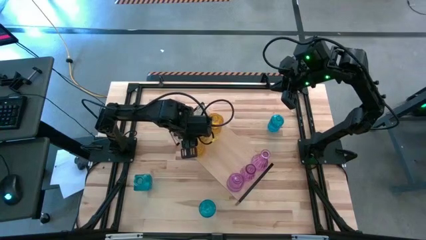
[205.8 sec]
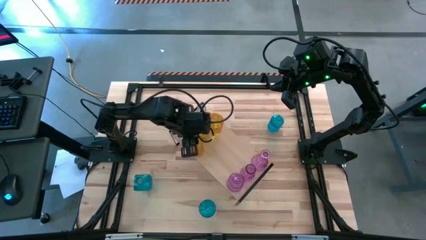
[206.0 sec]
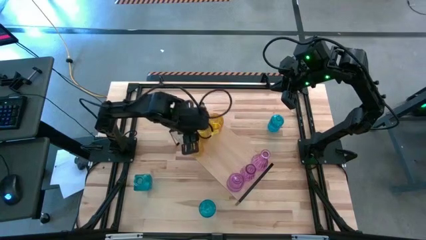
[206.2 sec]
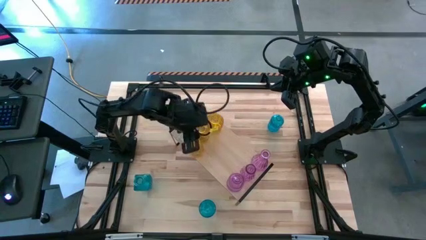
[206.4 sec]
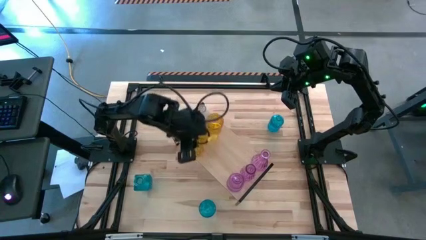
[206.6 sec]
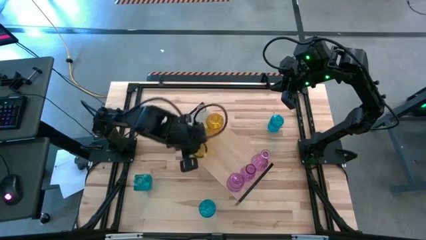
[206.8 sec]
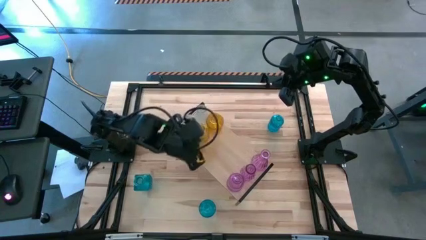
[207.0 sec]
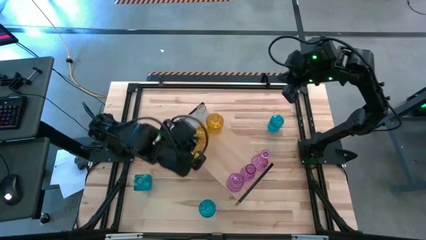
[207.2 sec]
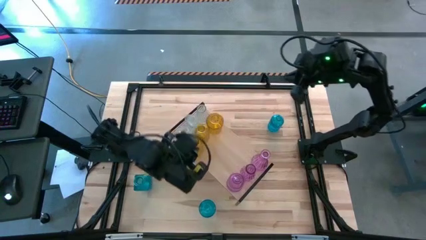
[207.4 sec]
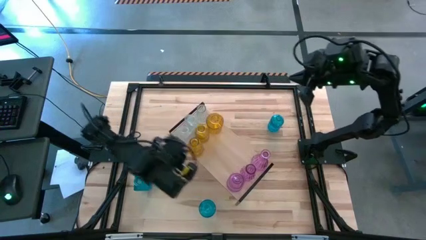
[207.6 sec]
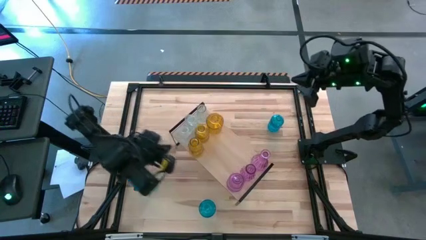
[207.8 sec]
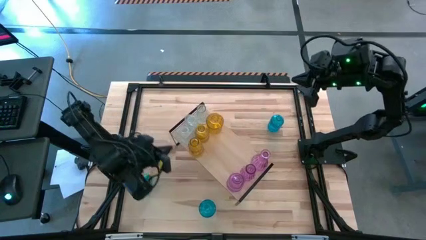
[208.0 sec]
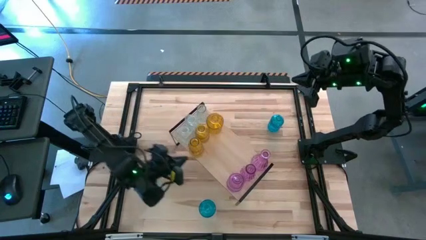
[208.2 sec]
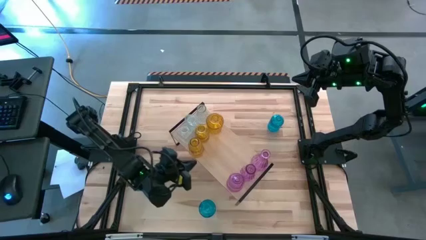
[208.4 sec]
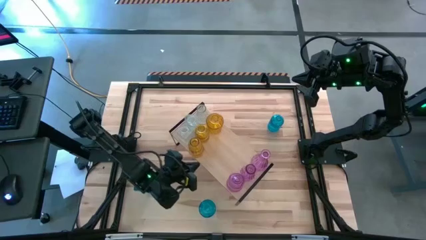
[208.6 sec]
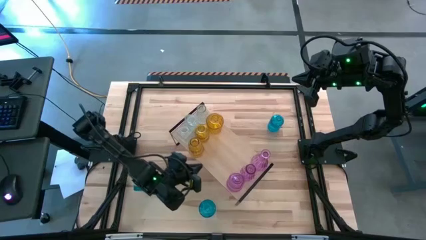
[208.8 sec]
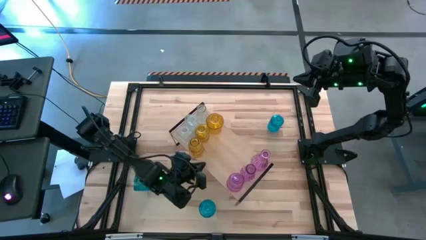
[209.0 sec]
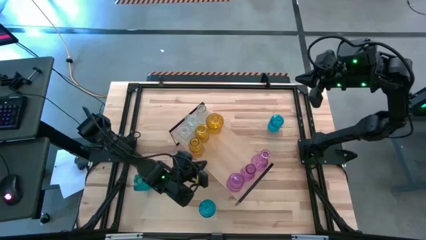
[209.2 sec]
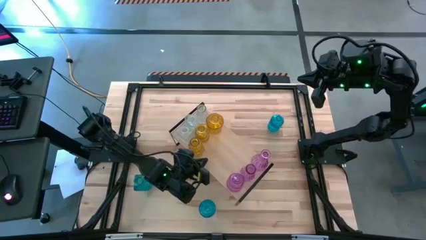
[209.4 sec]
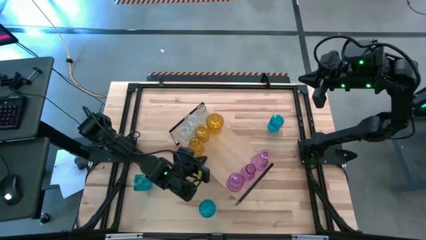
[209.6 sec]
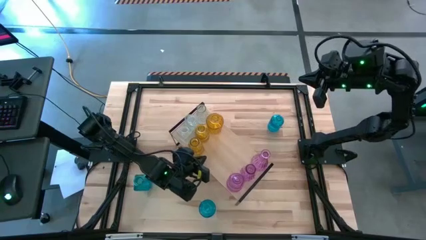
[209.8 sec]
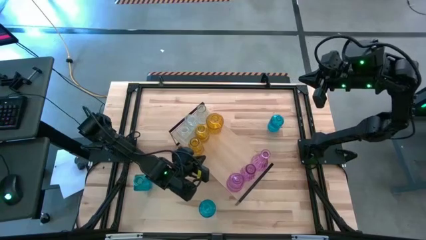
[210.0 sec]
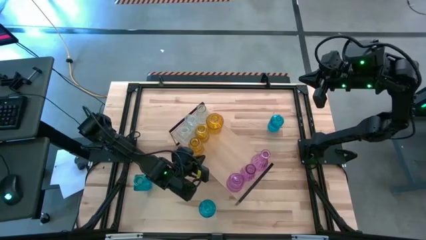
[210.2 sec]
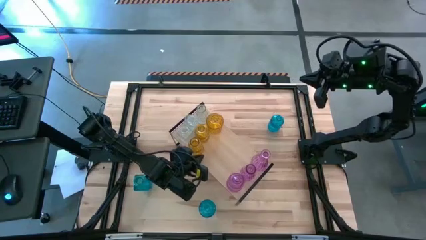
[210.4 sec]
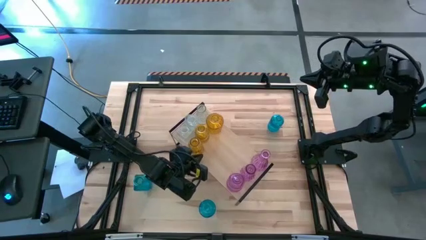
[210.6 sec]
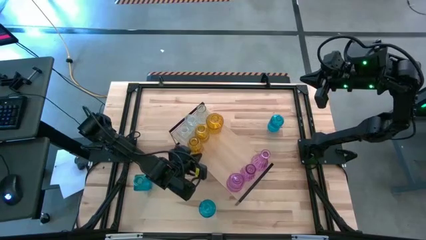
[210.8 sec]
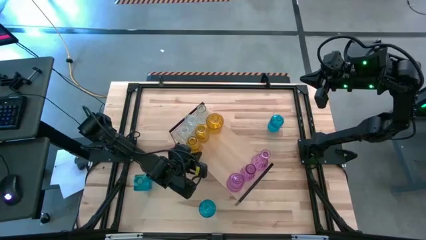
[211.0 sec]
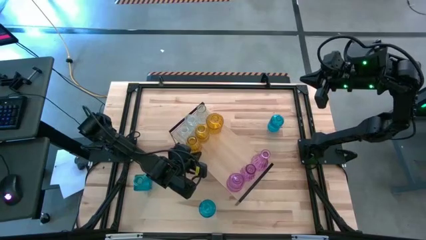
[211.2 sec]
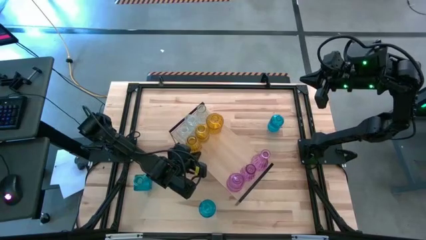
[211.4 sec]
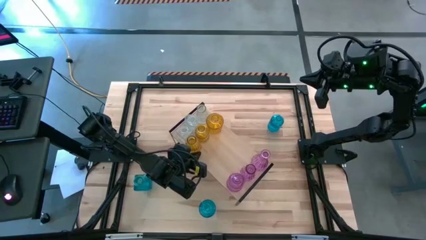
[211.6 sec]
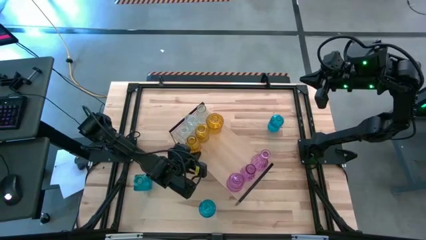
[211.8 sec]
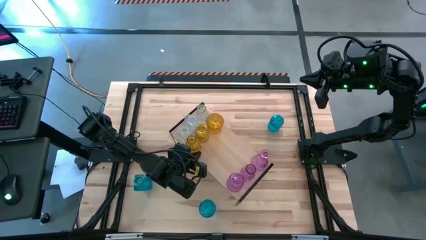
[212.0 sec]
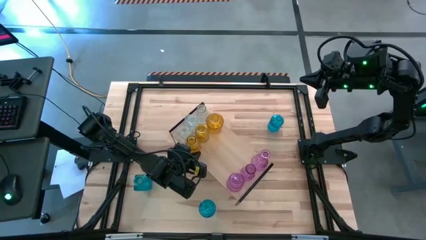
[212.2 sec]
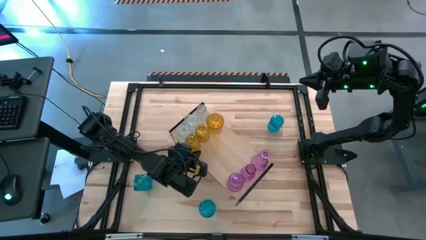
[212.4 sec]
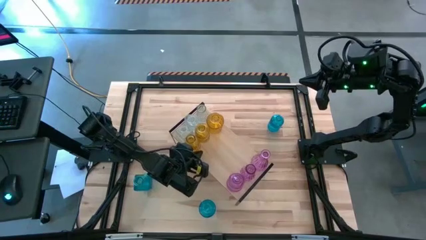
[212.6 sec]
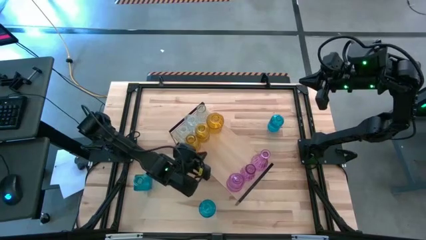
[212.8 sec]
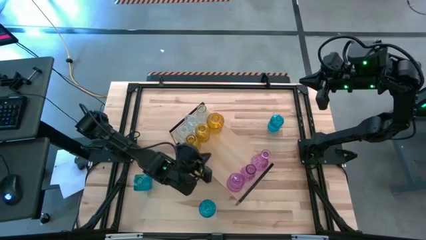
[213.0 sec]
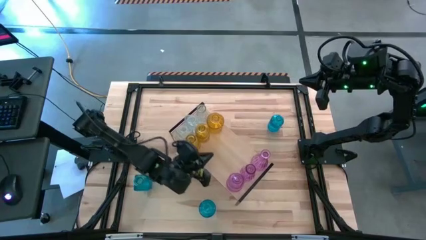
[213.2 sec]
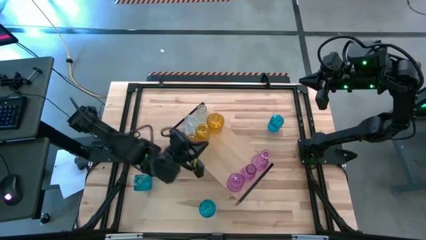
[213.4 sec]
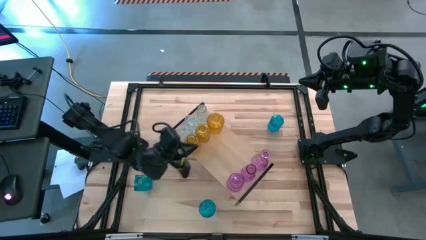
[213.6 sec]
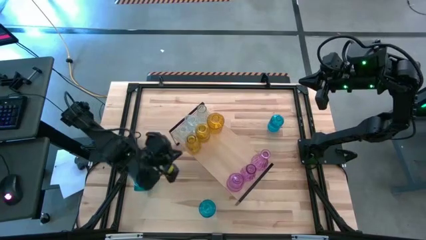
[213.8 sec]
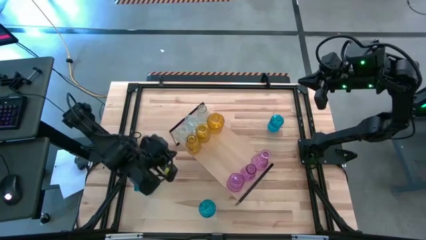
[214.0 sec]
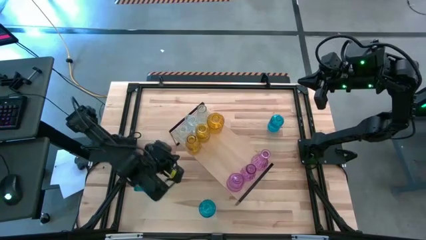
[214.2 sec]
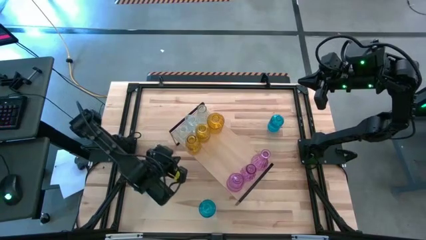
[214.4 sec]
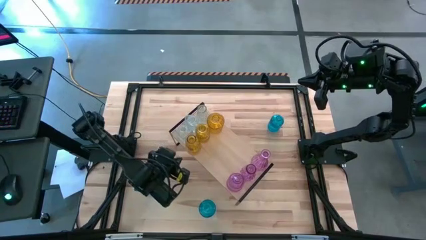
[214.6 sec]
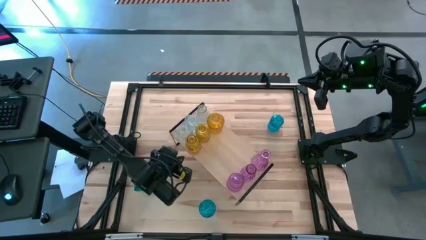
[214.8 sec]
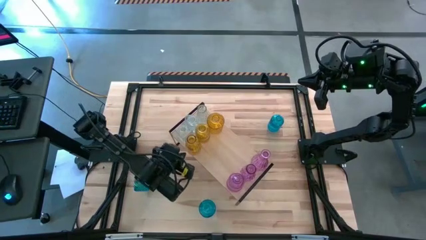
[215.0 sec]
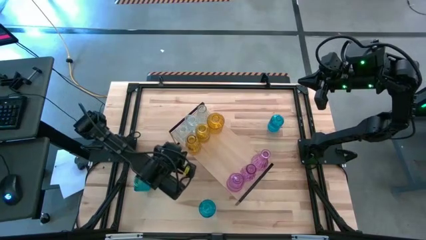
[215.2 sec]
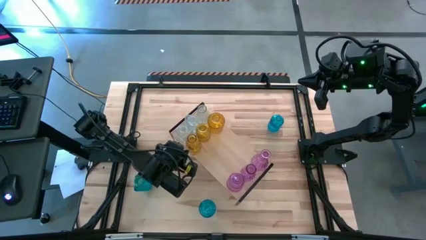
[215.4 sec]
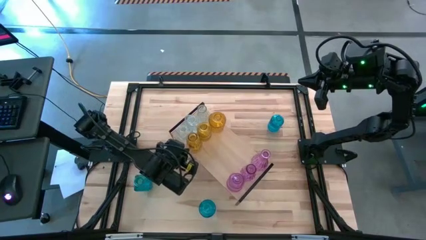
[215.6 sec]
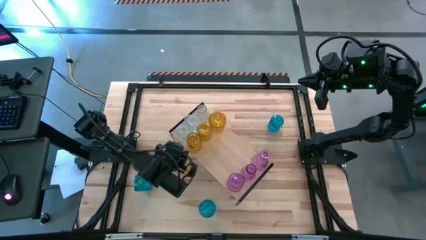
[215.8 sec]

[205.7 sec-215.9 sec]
Task: sort vases onto shelf
Put the yellow flower vase on the shelf aligned with the other yellow flower vases

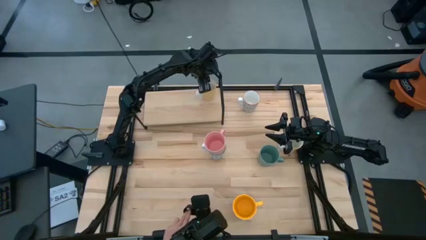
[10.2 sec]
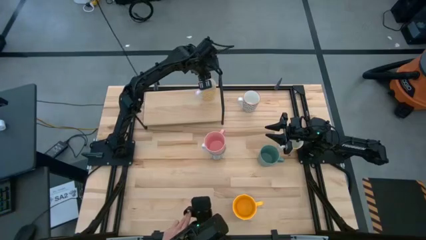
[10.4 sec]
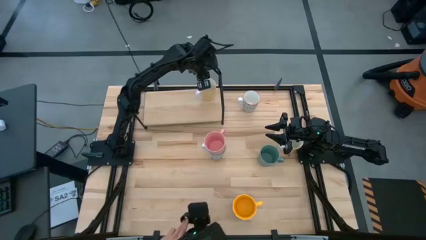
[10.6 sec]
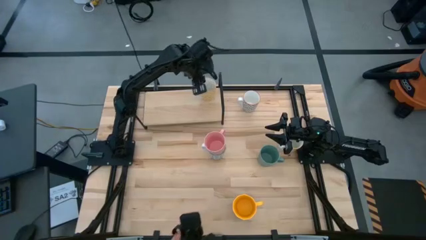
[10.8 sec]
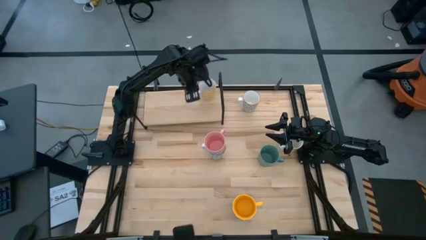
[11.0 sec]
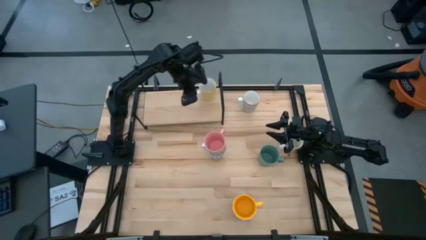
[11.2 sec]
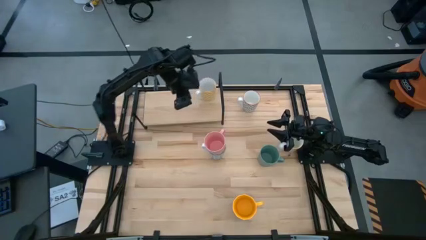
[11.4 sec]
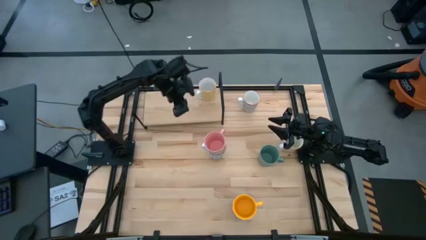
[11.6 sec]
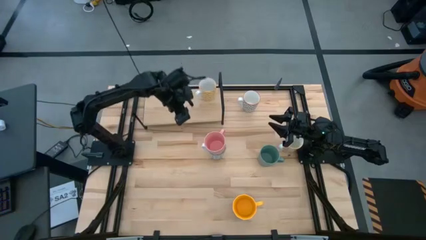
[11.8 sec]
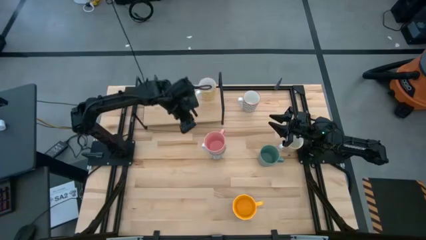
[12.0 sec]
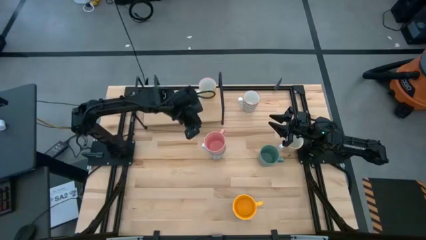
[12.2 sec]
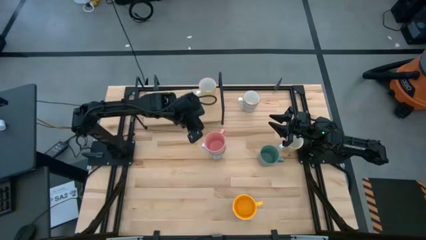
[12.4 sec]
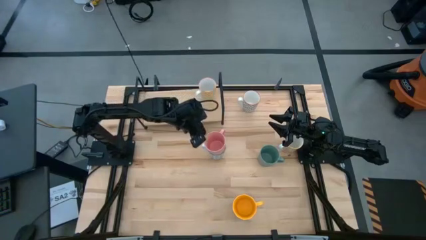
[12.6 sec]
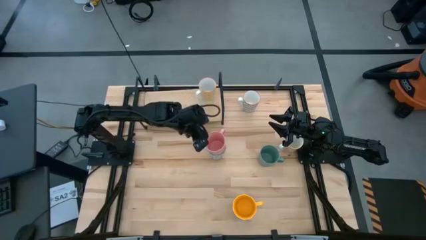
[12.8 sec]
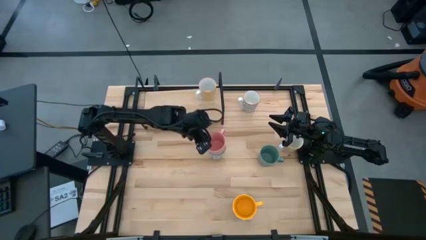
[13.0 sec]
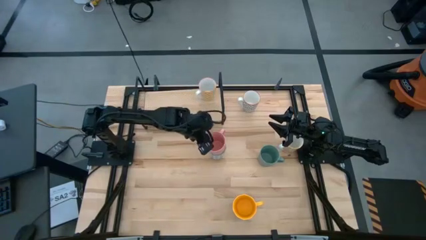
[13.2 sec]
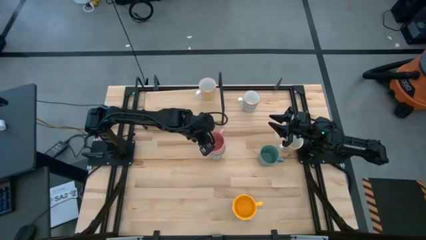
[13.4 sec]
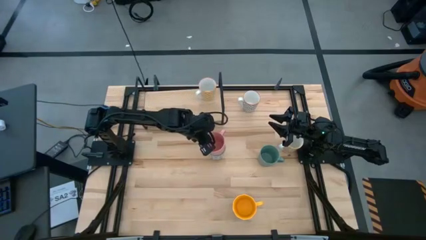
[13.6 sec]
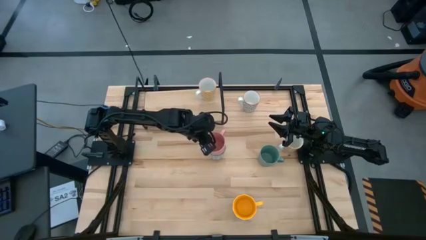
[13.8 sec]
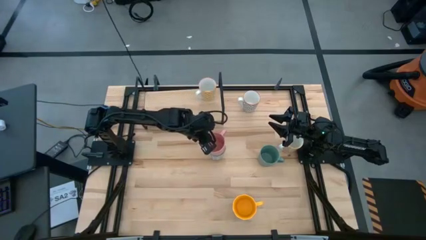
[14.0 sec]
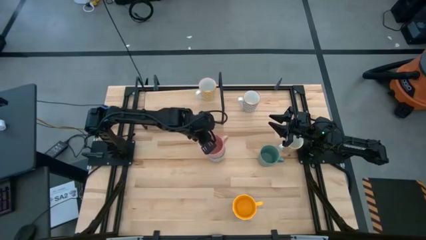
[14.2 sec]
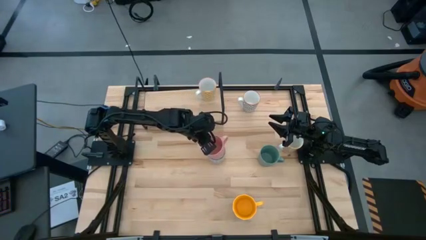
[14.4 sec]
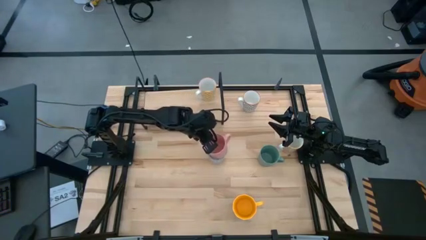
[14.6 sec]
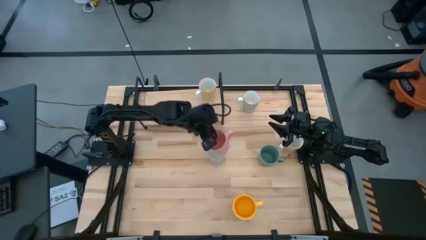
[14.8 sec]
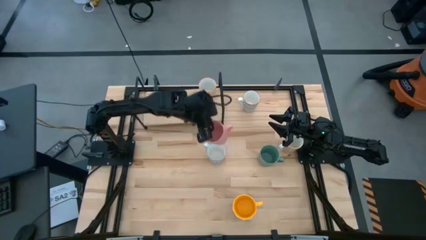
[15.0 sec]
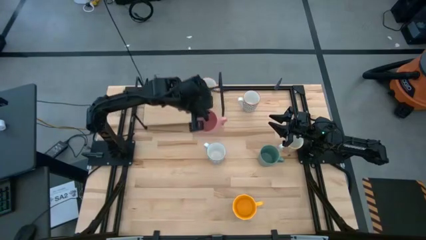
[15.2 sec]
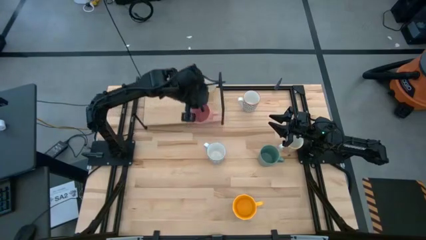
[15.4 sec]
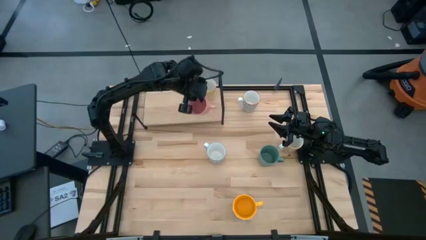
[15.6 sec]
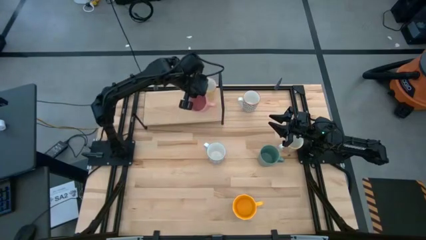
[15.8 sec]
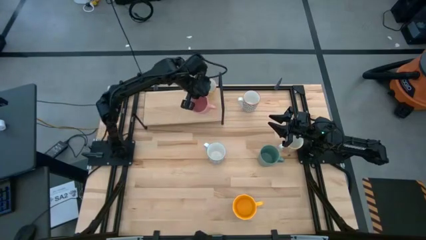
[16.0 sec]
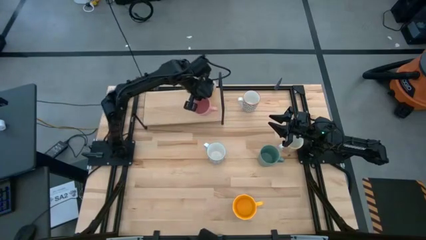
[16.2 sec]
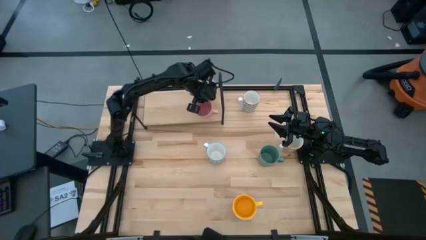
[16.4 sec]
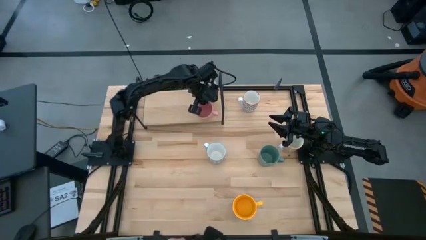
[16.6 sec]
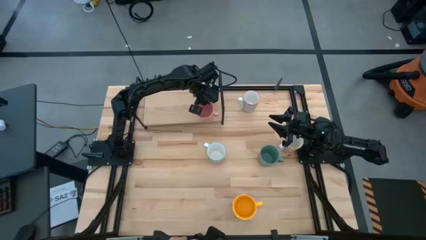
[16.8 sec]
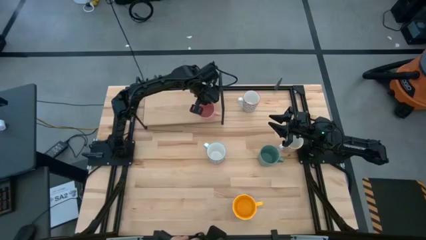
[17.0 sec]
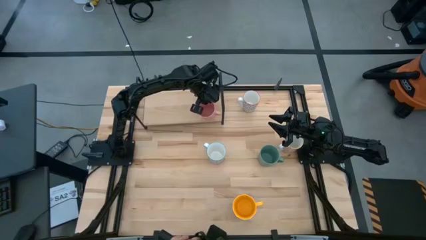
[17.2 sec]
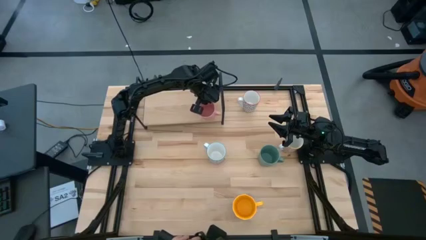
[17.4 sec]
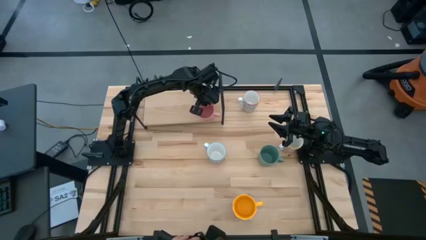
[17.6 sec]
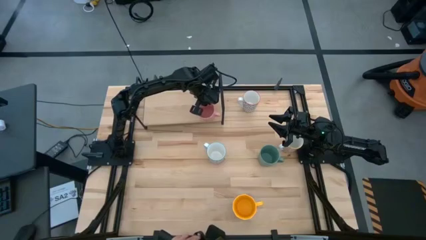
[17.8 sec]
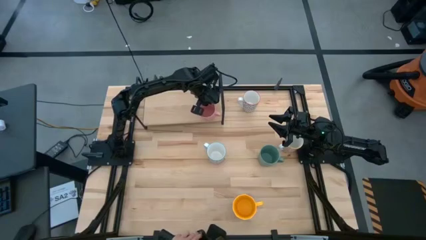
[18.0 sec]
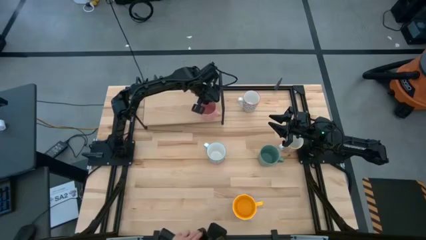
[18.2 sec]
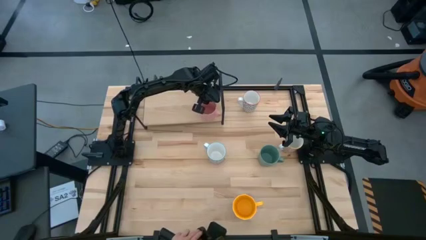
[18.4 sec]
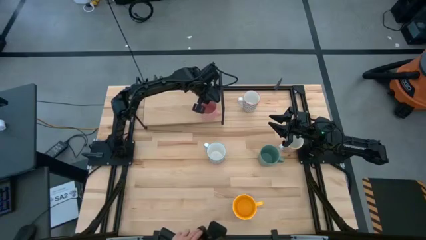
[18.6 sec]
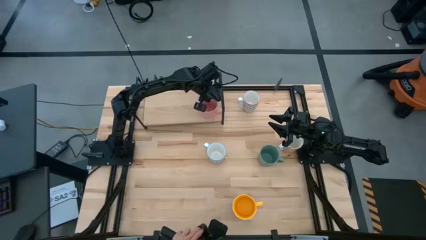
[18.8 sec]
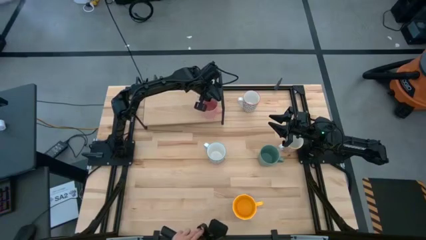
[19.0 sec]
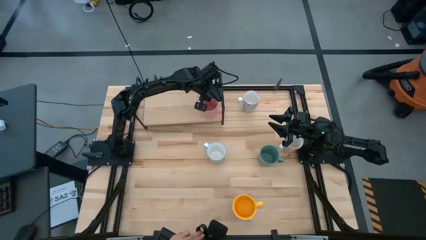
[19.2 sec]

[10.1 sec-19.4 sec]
Task: Place coffee mugs
Put the pink mug on the shelf
